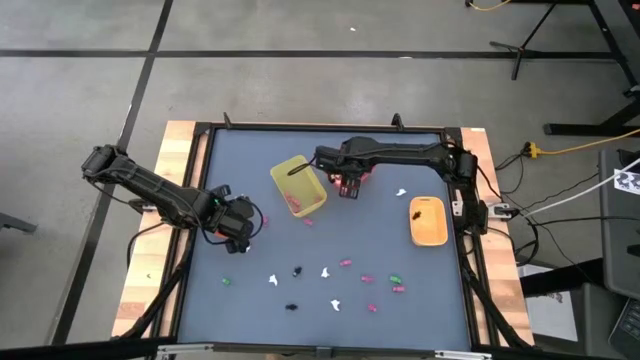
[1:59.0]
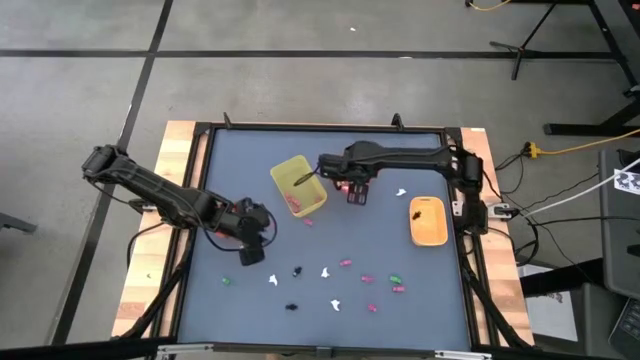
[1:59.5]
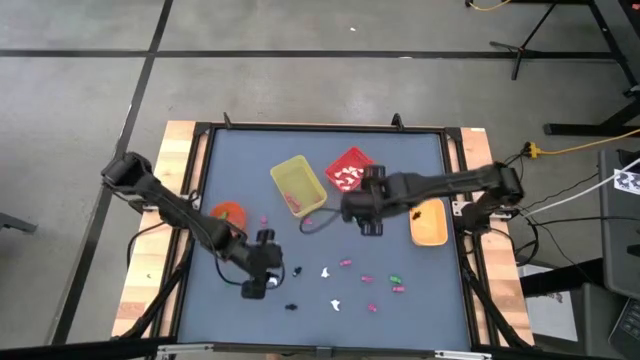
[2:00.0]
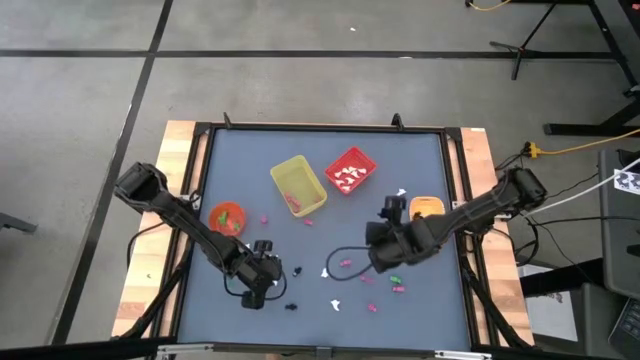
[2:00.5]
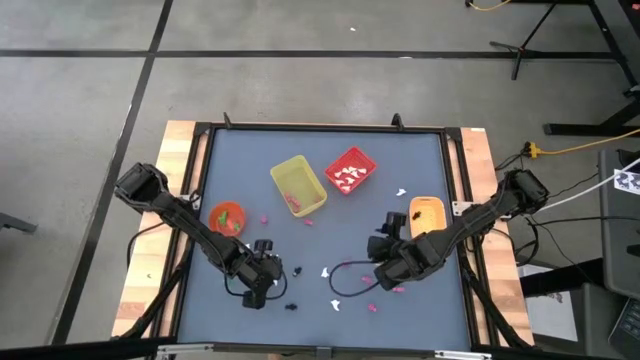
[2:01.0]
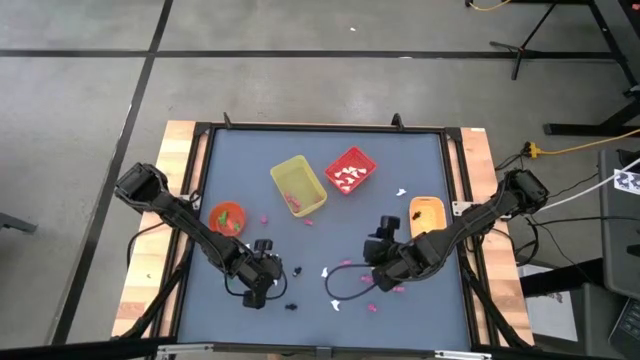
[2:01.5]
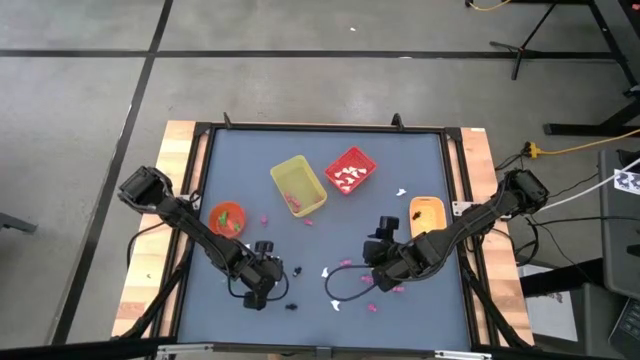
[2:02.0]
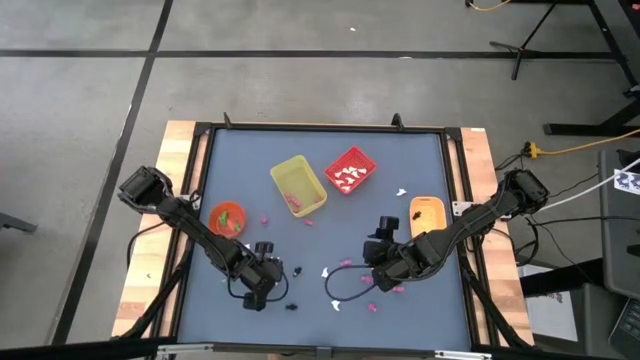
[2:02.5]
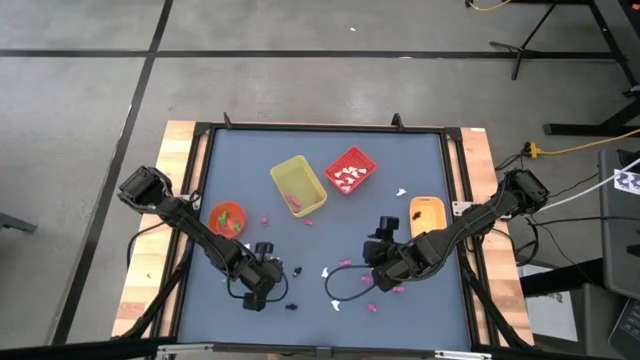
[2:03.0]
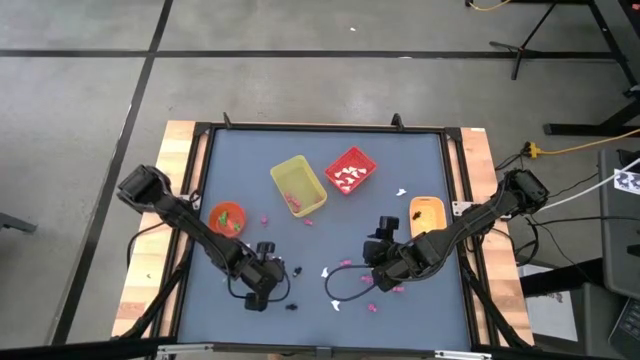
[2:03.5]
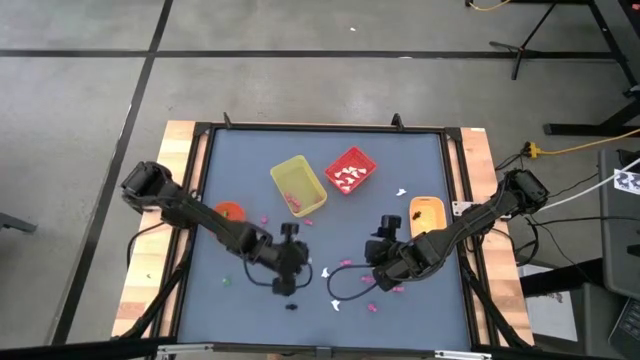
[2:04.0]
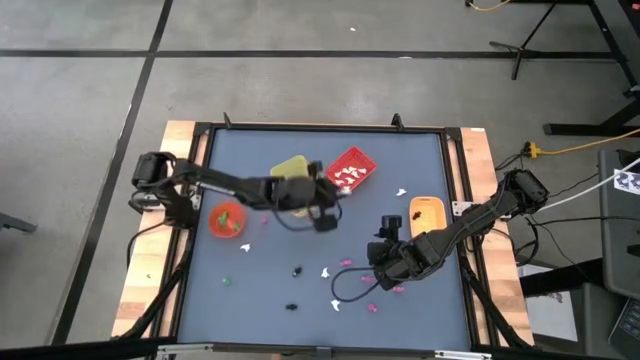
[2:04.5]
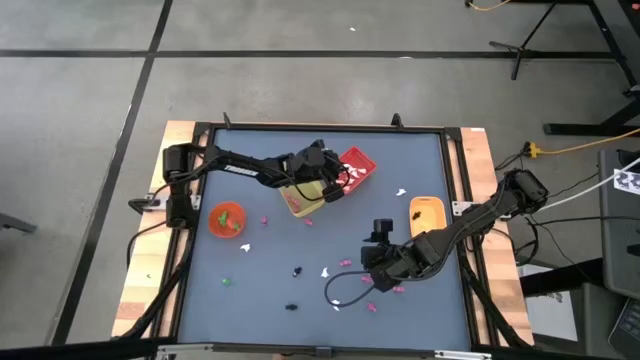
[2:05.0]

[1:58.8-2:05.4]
Task: Sort Halloween decoration
Put the white ghost toy into the red bin

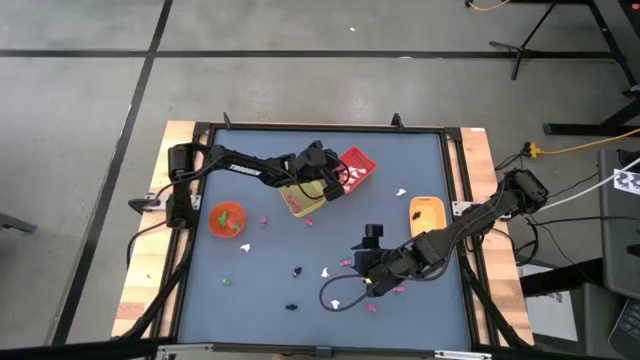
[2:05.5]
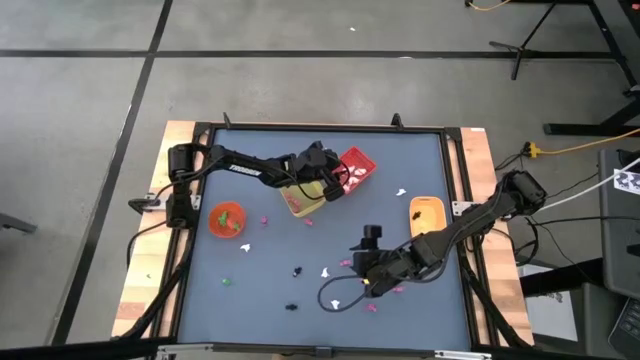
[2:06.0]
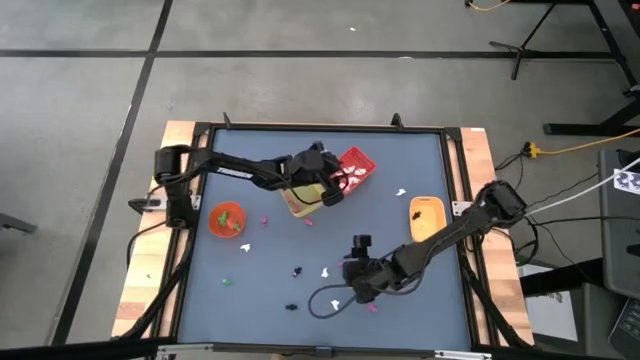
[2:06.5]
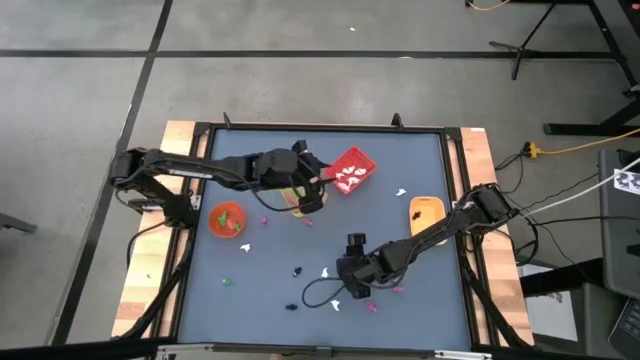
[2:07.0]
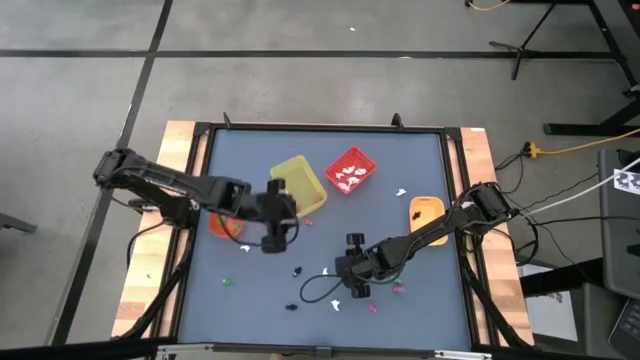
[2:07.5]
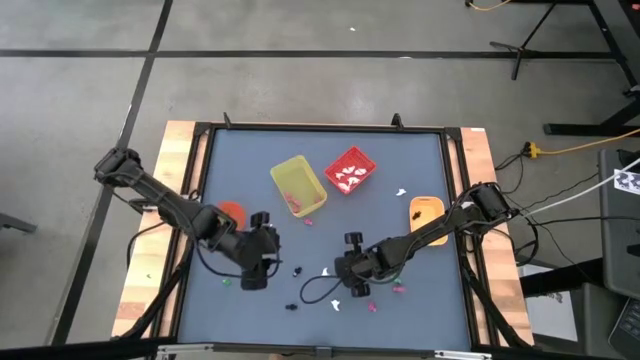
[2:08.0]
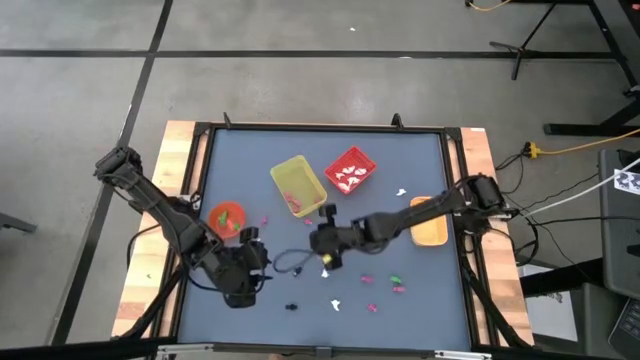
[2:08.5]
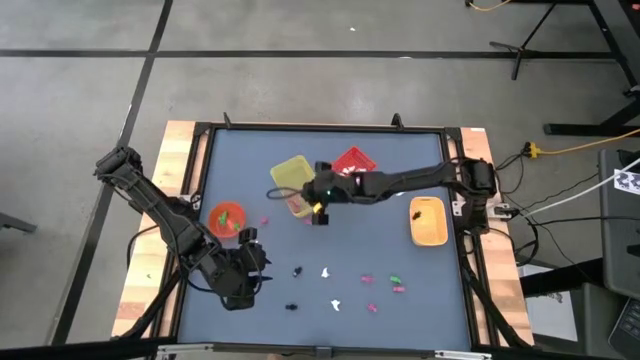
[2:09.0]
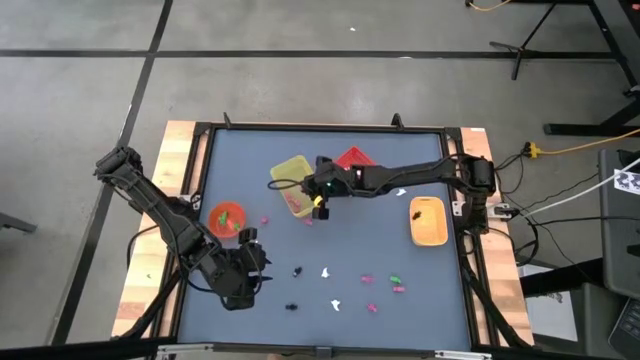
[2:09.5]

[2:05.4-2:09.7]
Put the pink skeleton toy into the yellow bin

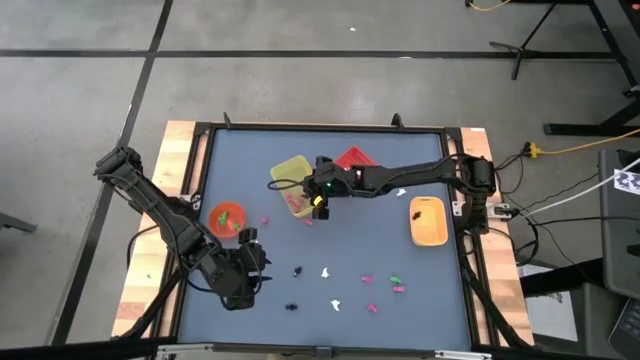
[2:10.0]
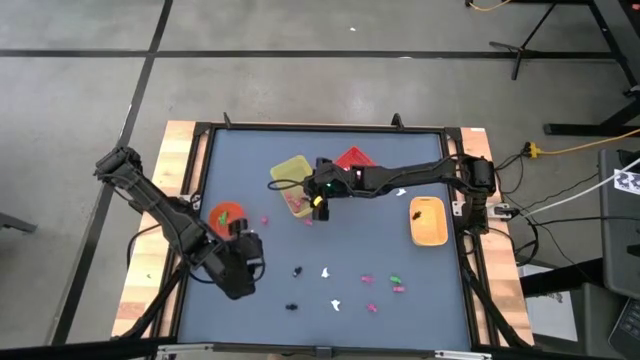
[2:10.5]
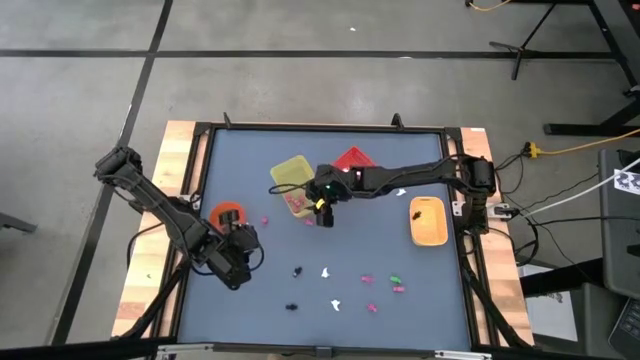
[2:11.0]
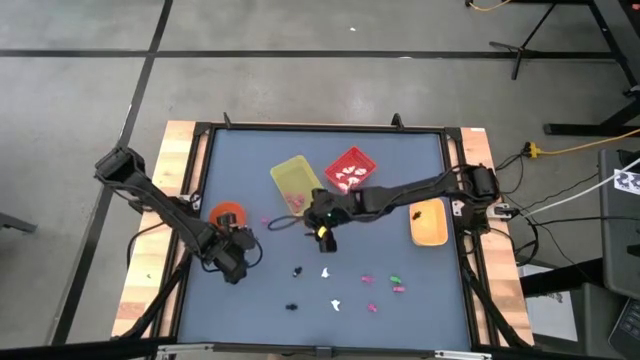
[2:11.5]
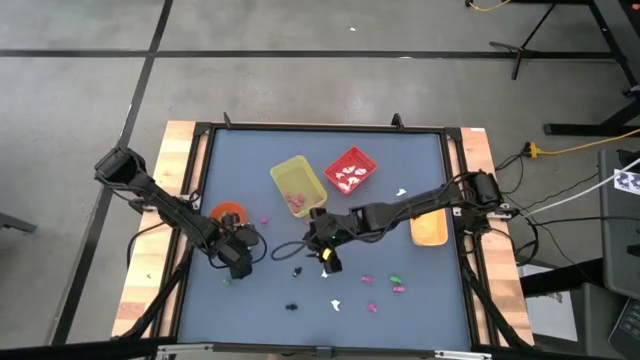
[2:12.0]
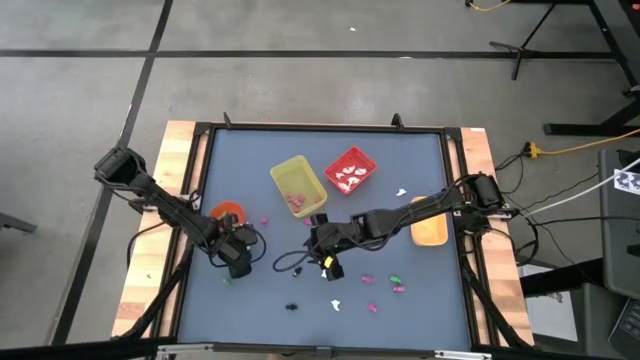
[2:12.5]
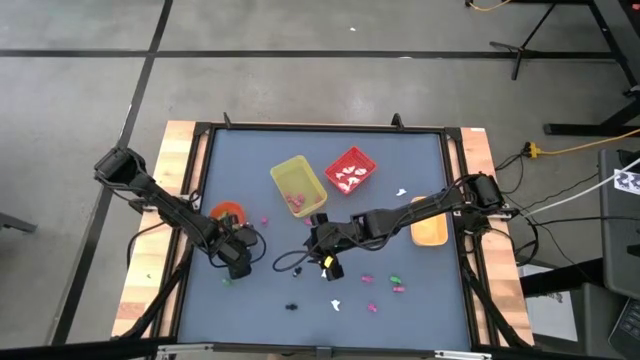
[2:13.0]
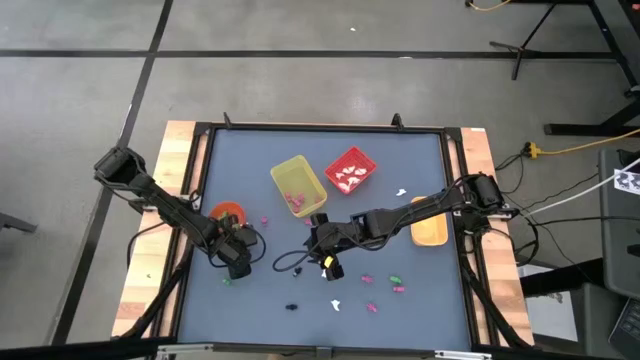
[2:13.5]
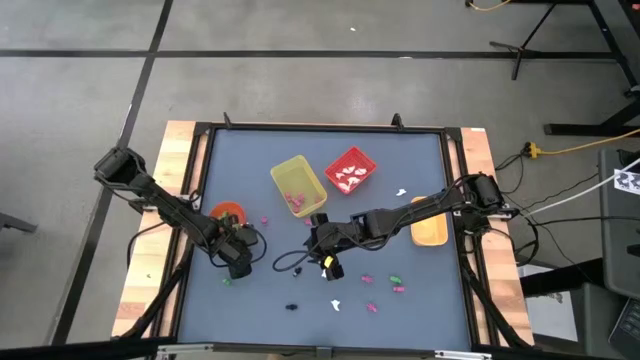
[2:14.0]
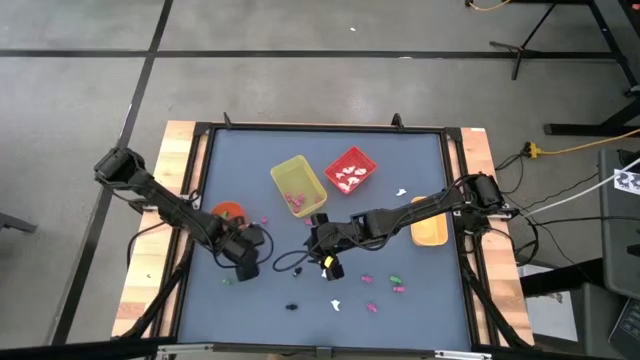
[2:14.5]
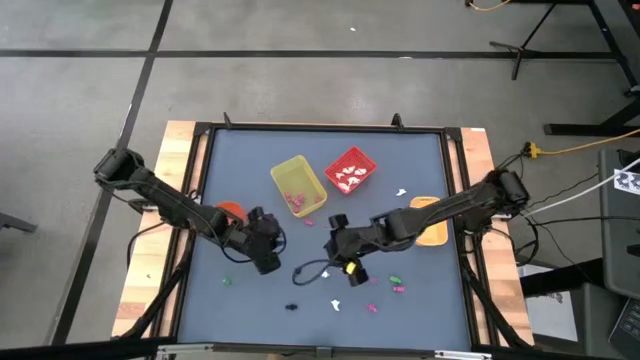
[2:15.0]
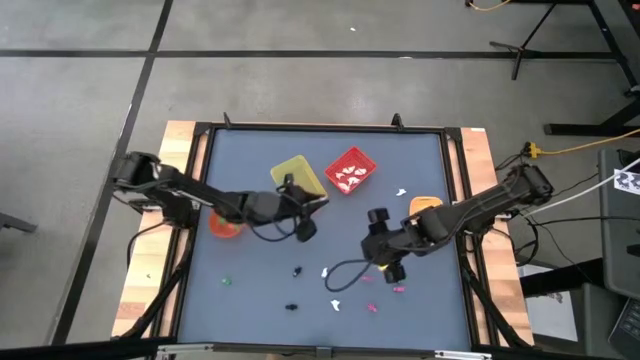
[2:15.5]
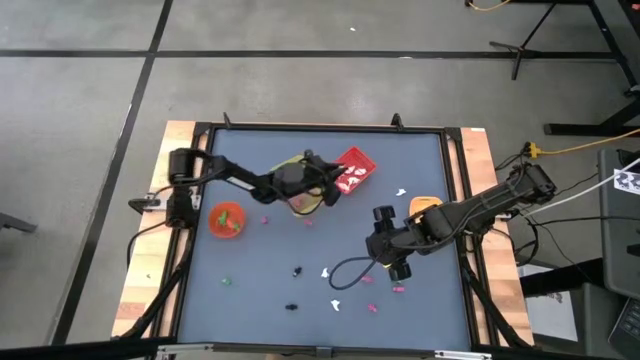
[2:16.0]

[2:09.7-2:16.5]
Put the white ghost toy into the red bin

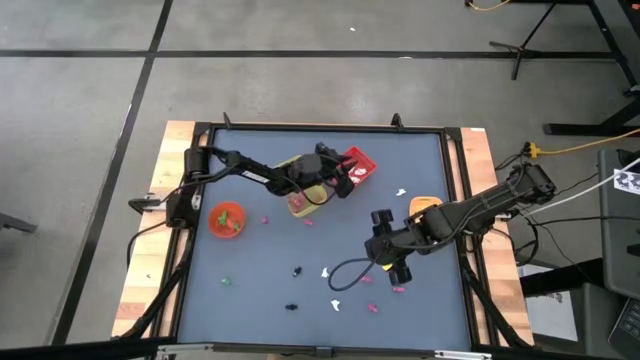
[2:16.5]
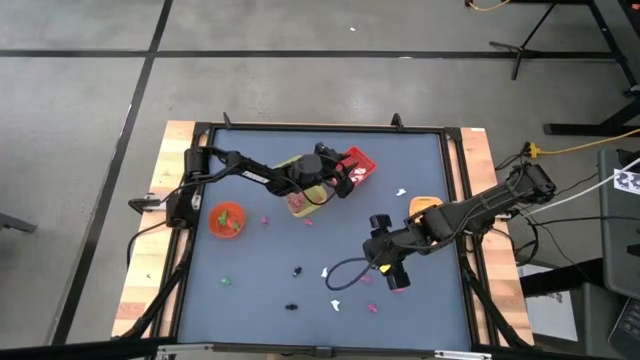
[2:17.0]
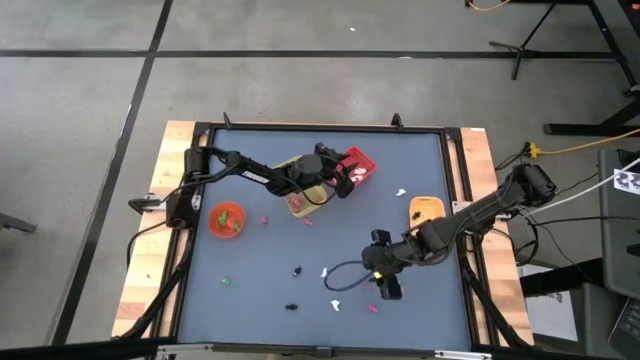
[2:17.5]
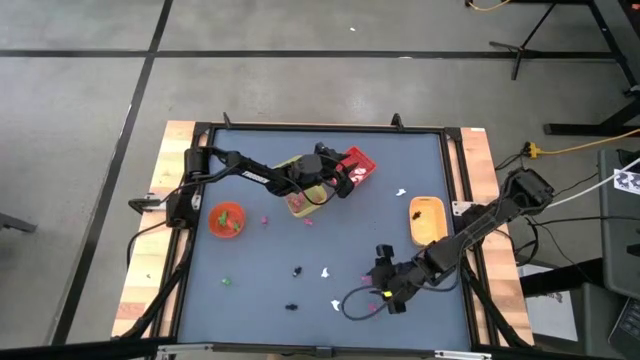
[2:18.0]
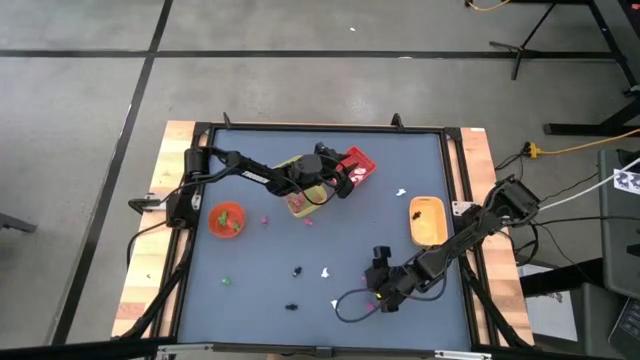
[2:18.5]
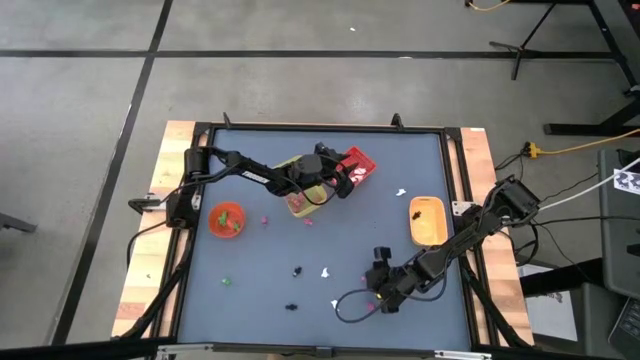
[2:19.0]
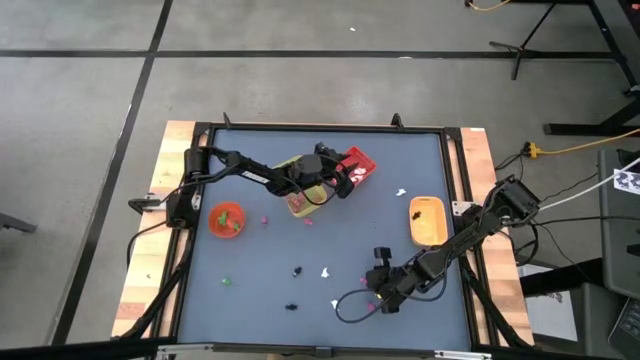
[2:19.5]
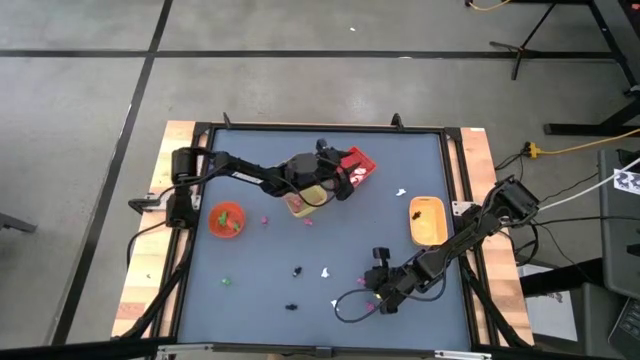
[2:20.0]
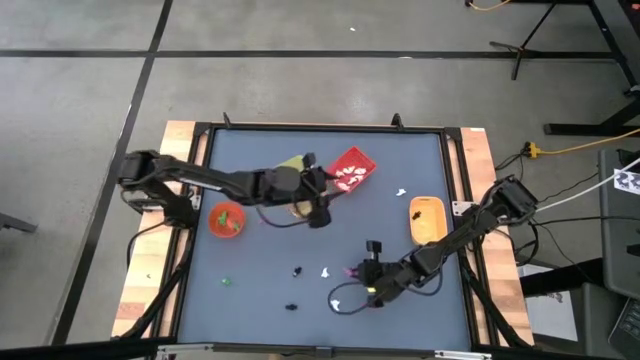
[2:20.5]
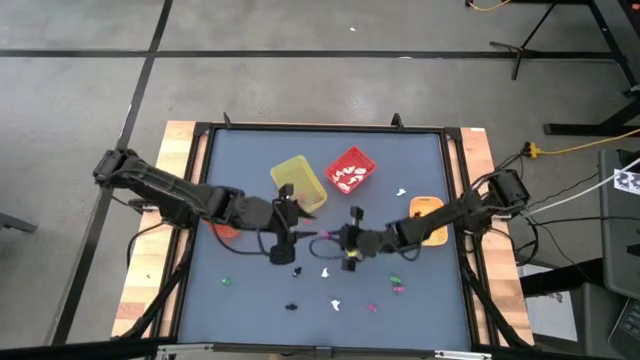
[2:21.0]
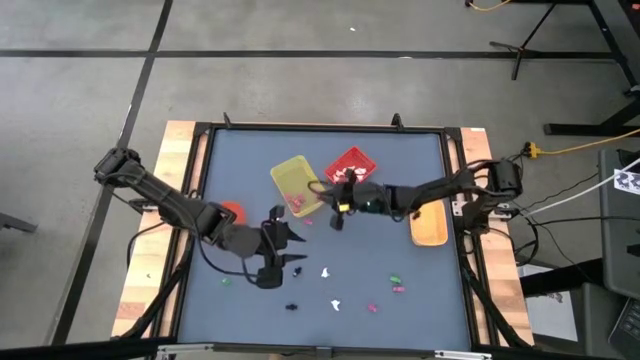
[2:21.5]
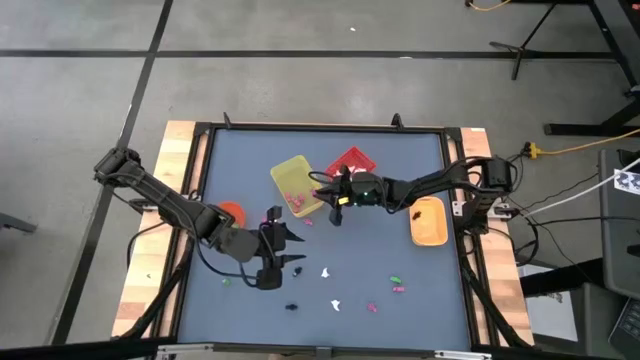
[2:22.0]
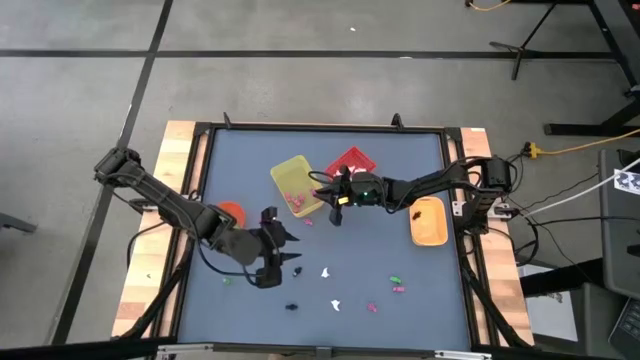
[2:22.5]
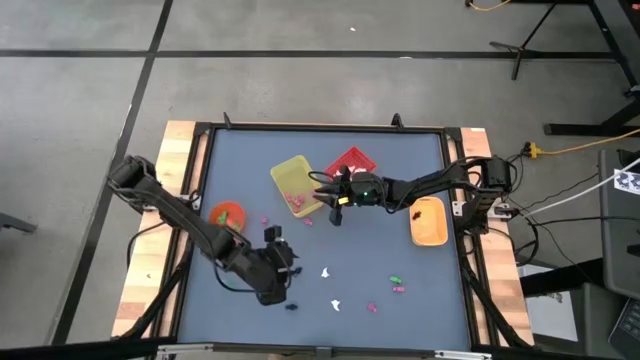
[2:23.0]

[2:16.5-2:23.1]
Put the pink skeleton toy into the yellow bin
